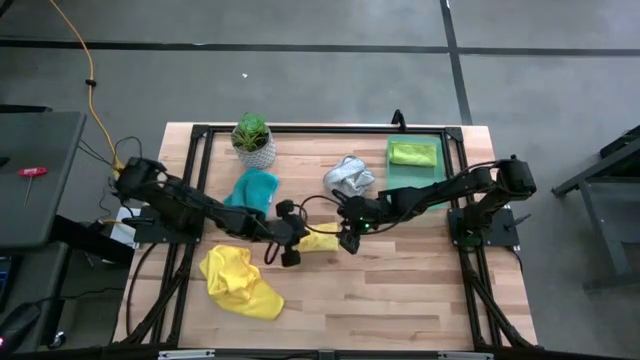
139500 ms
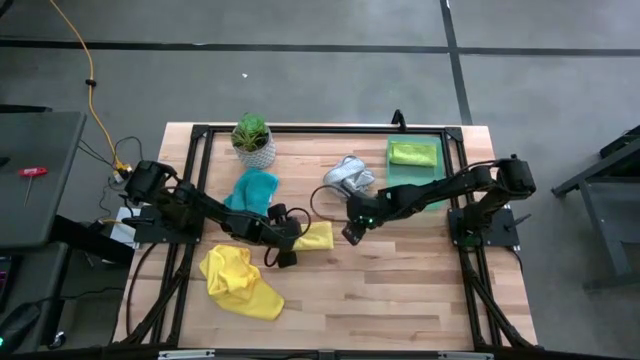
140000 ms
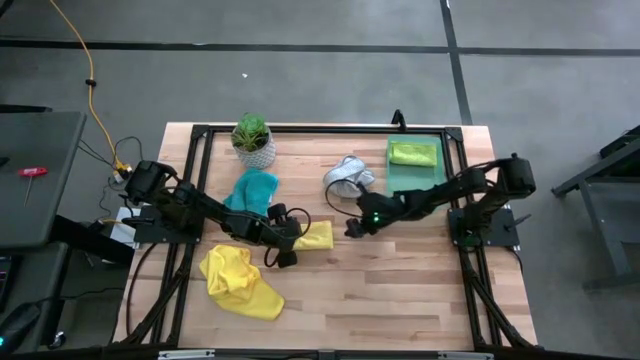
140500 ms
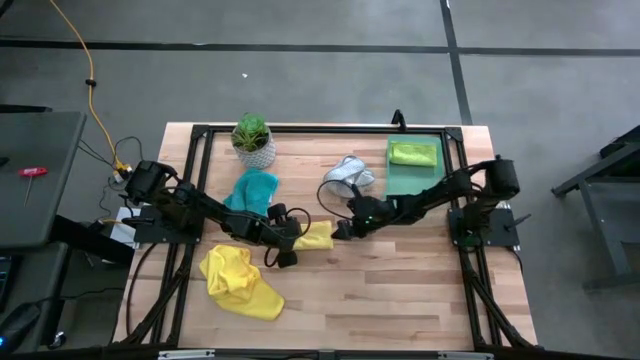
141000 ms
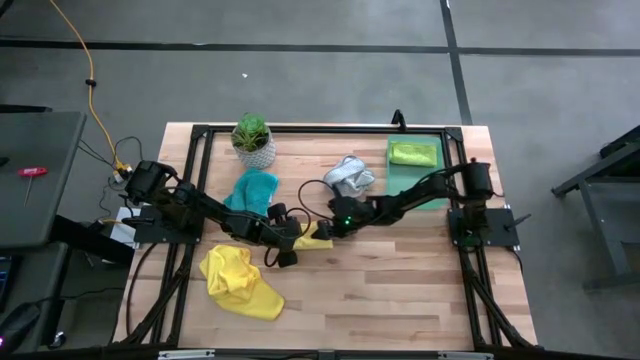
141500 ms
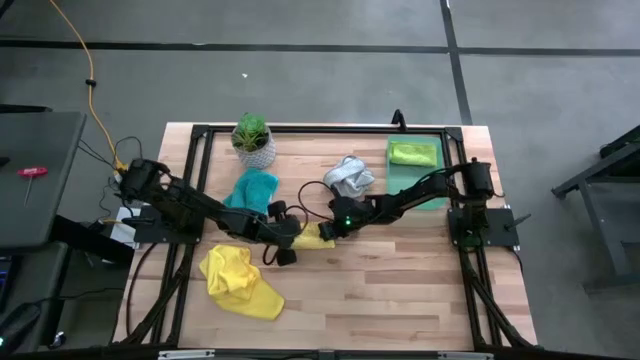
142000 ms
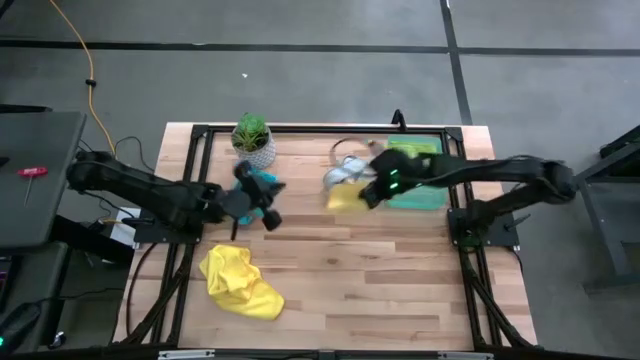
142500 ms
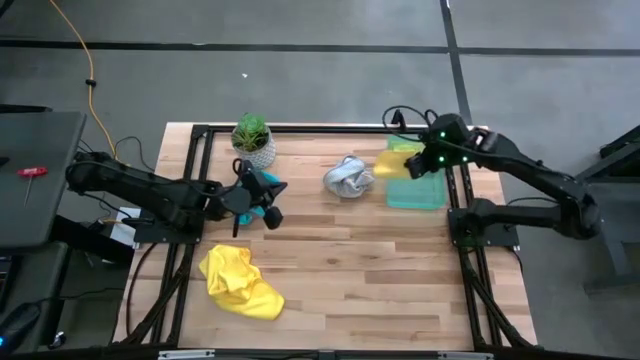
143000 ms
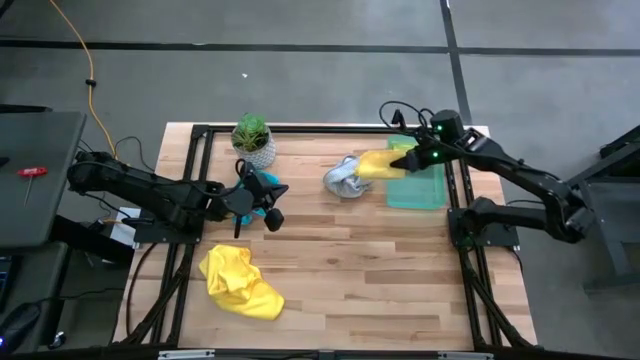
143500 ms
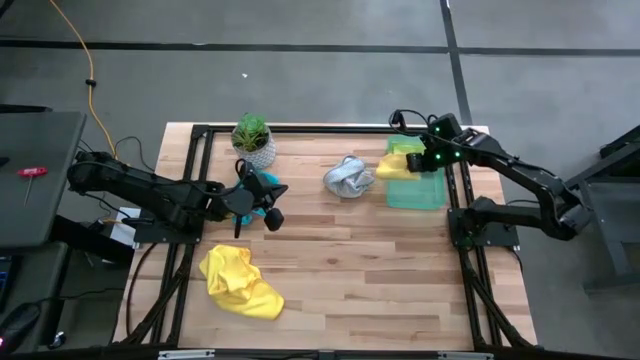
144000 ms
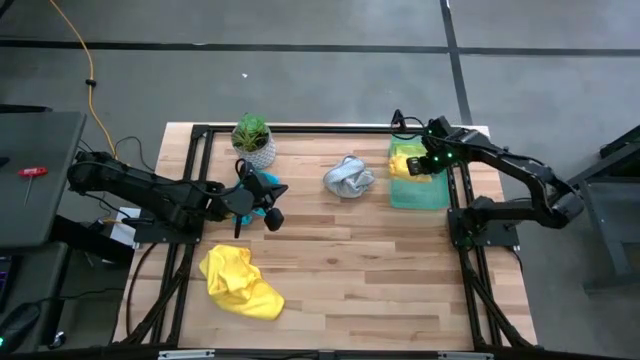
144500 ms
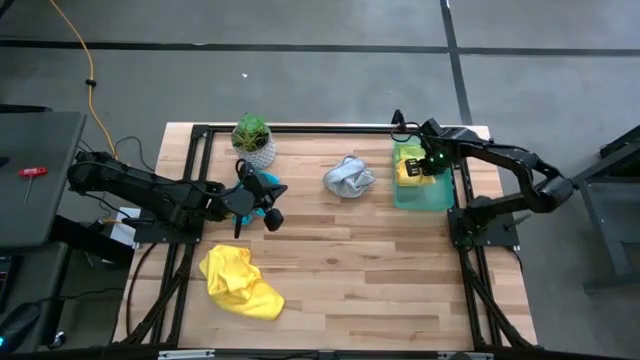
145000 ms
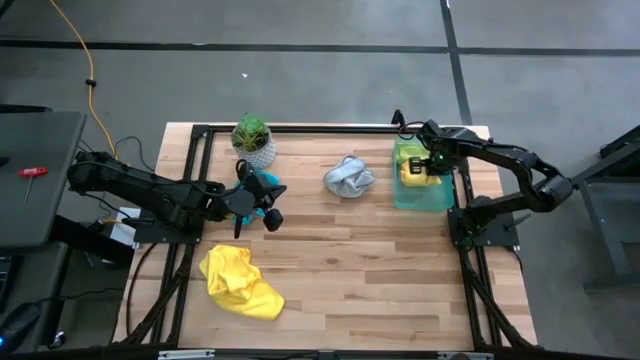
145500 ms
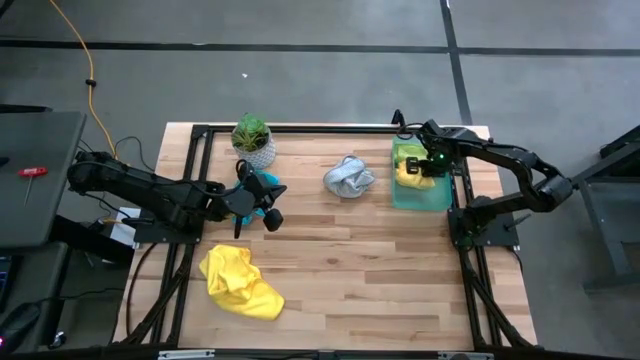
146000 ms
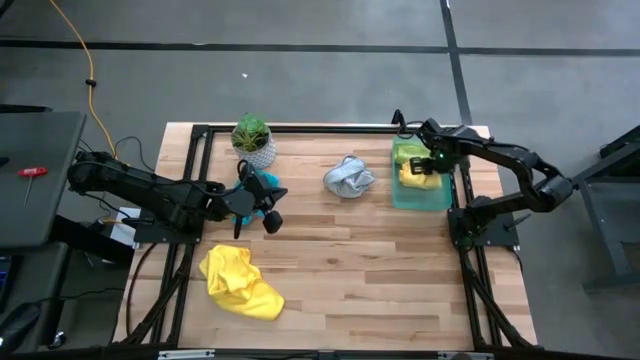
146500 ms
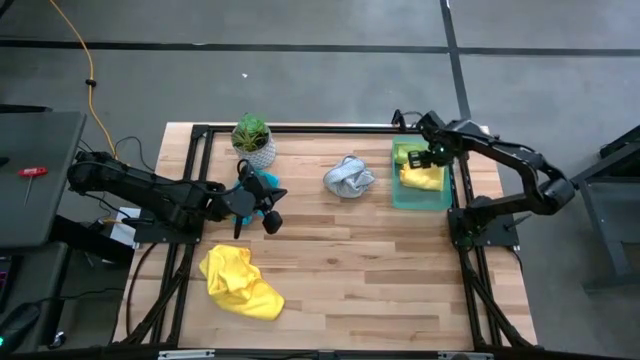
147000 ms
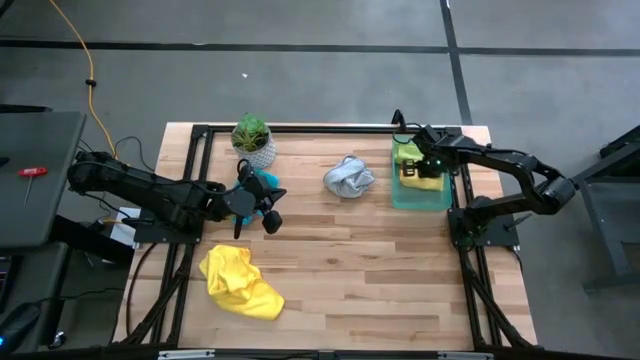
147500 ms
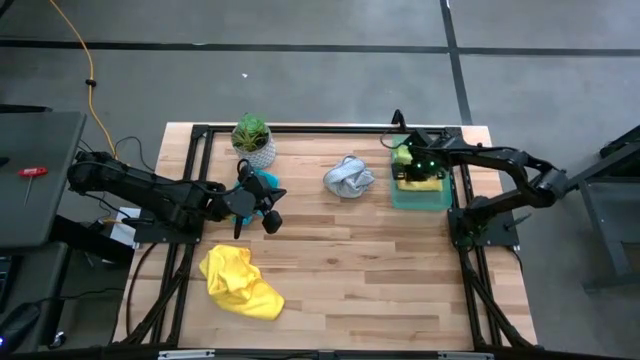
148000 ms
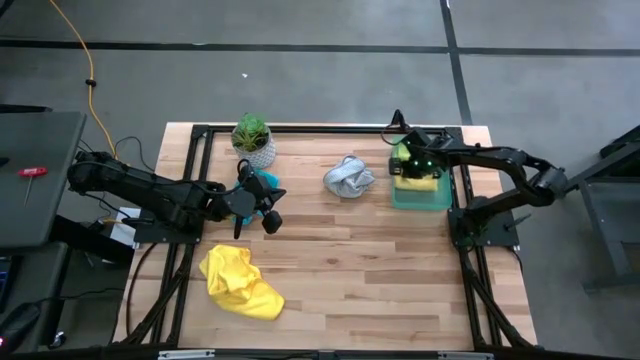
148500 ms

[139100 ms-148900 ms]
Task: Fold microfiber towels
Put the folded yellow microfiber cloth into the green bin

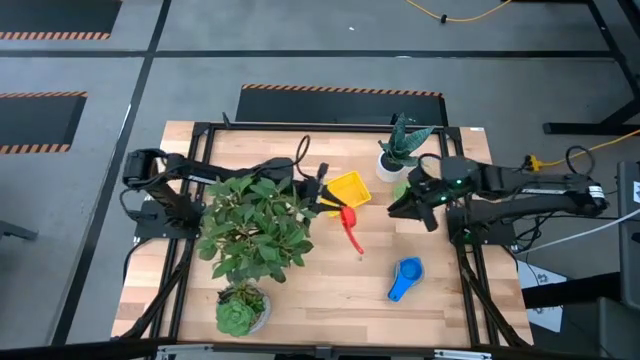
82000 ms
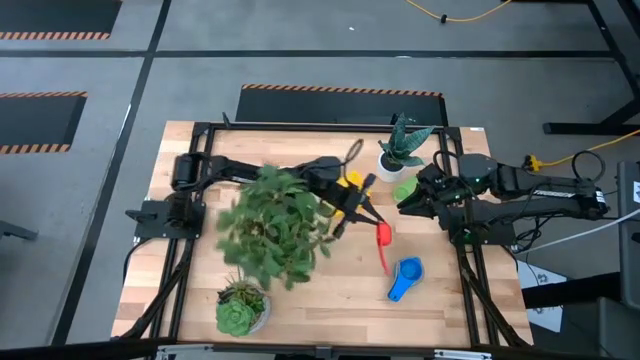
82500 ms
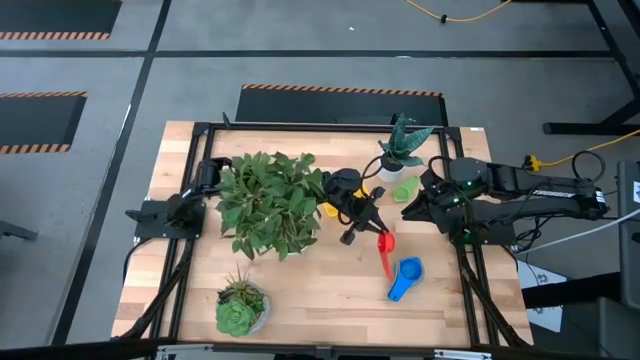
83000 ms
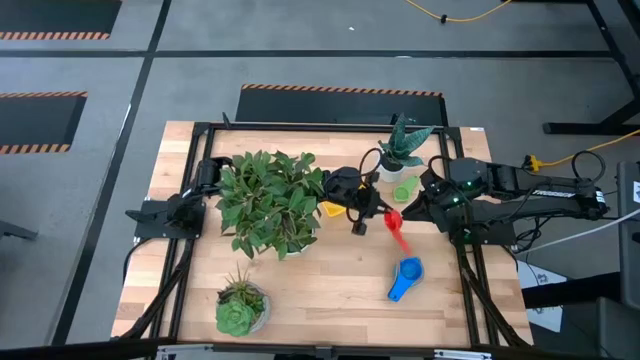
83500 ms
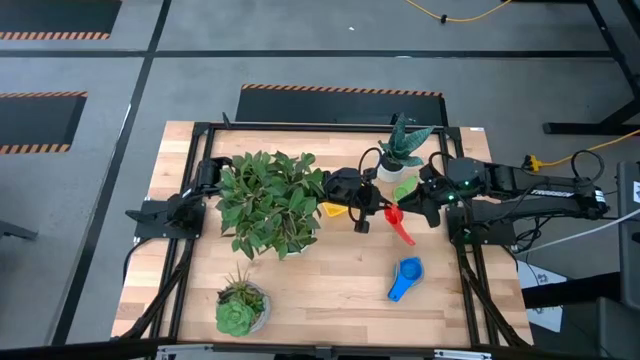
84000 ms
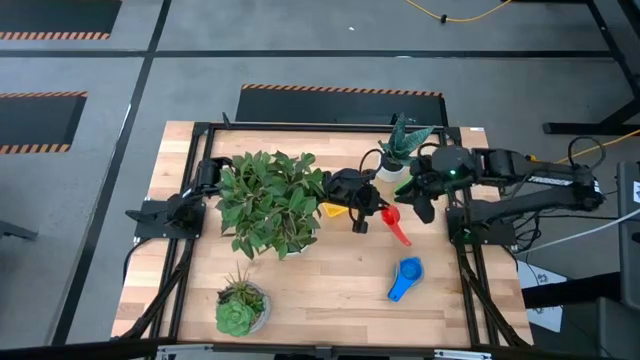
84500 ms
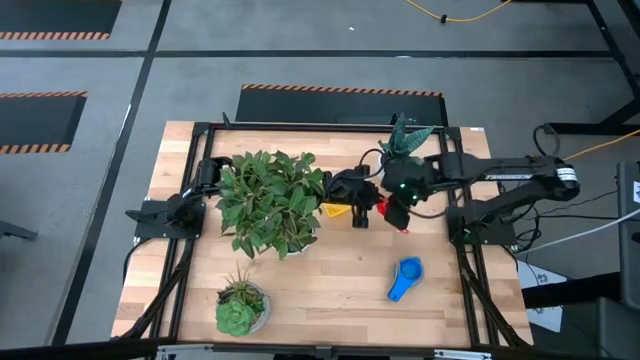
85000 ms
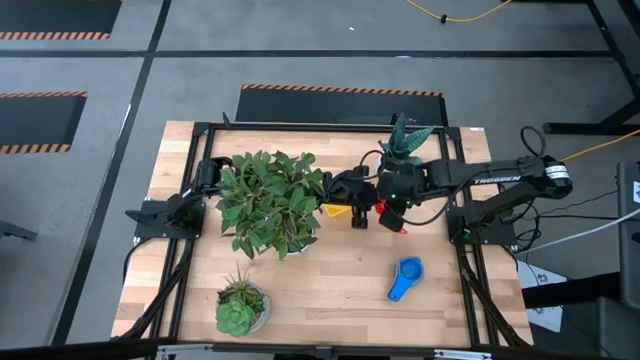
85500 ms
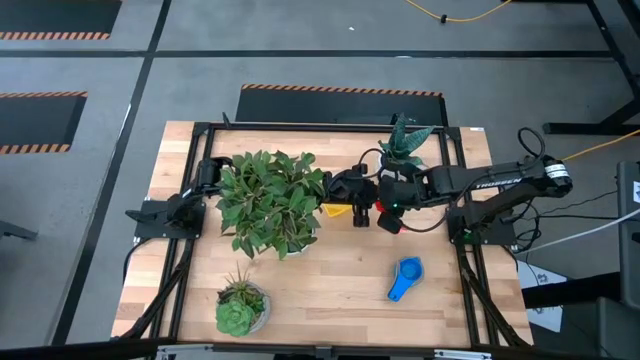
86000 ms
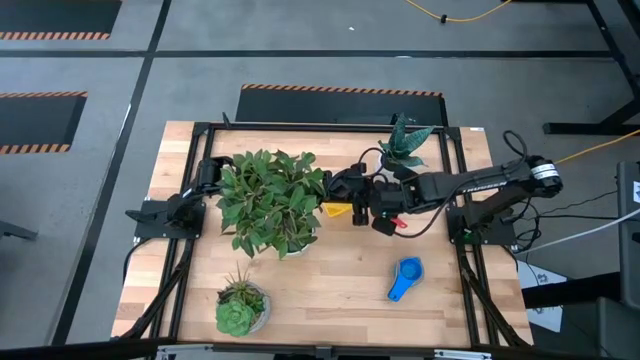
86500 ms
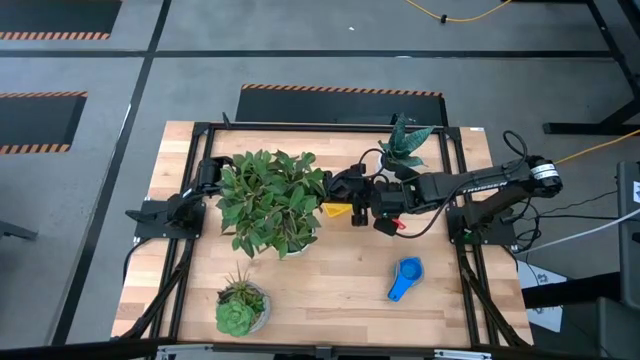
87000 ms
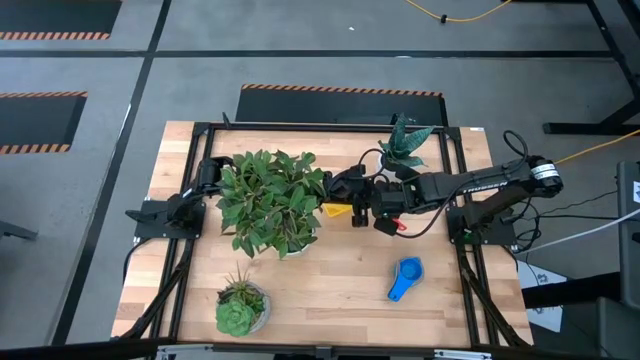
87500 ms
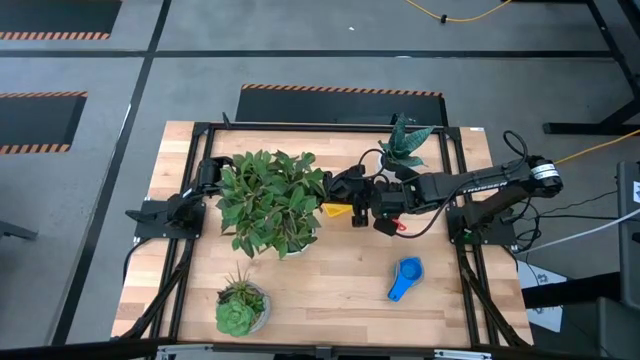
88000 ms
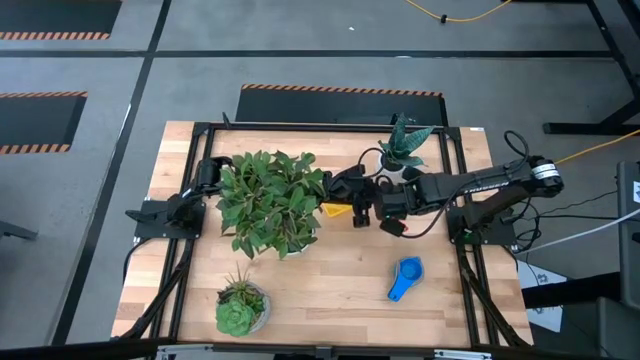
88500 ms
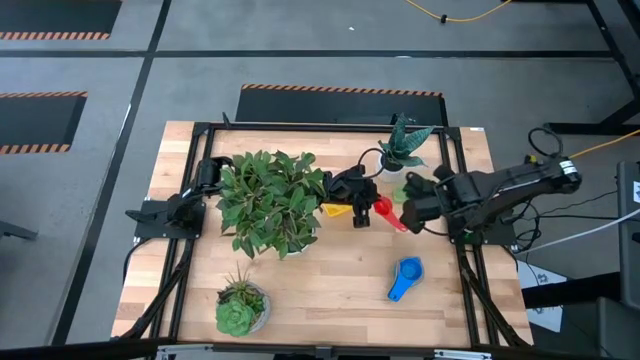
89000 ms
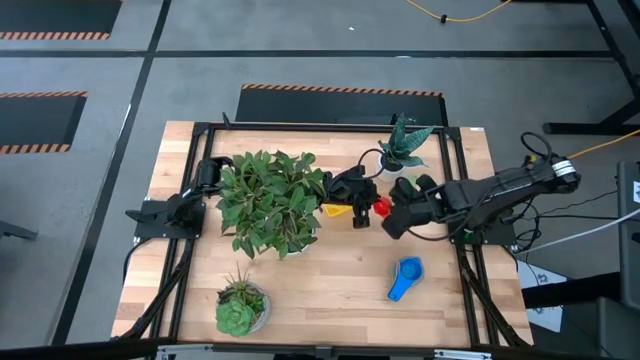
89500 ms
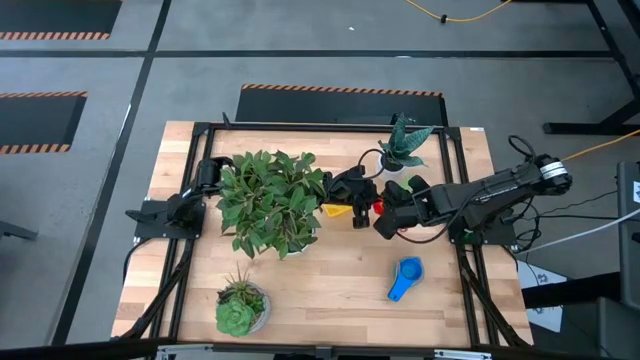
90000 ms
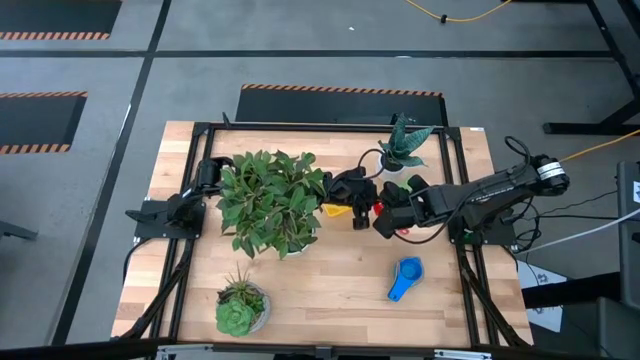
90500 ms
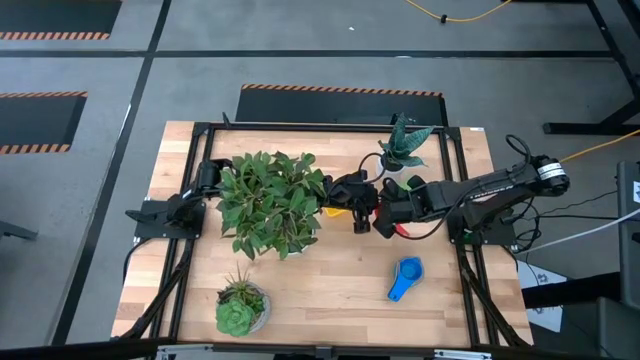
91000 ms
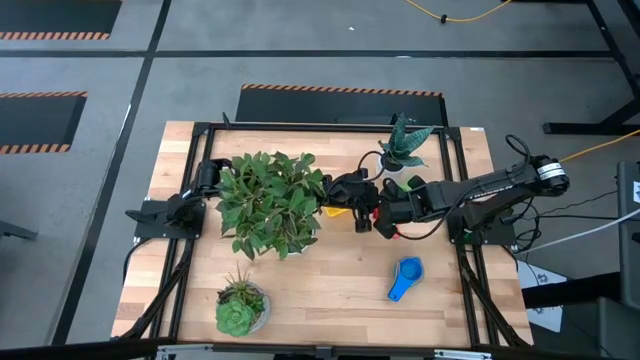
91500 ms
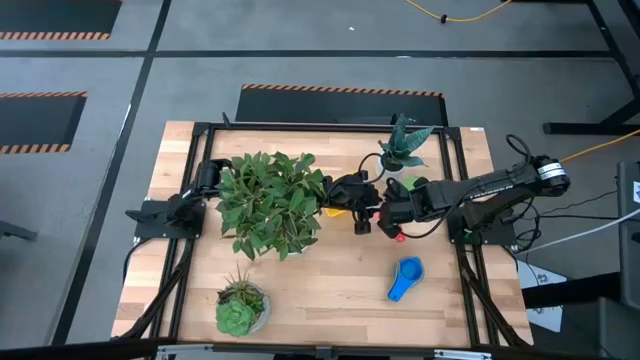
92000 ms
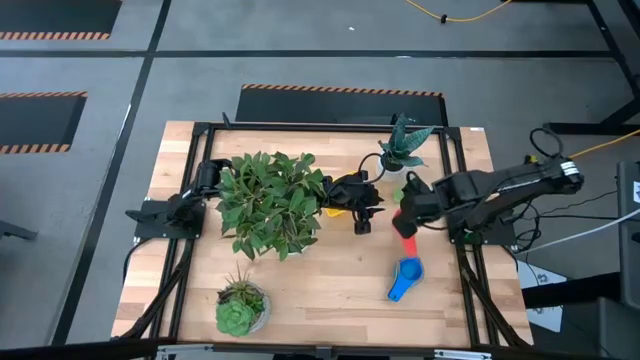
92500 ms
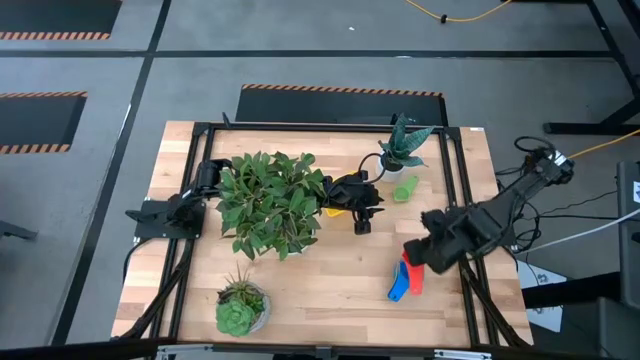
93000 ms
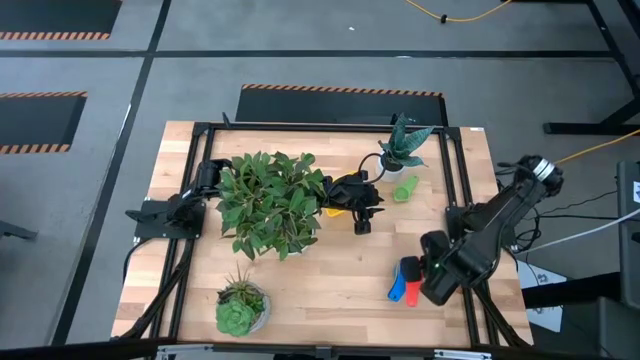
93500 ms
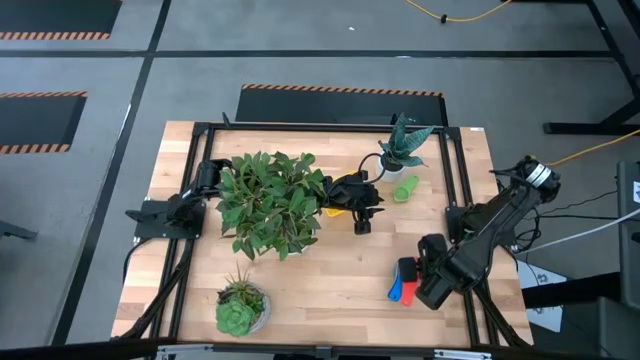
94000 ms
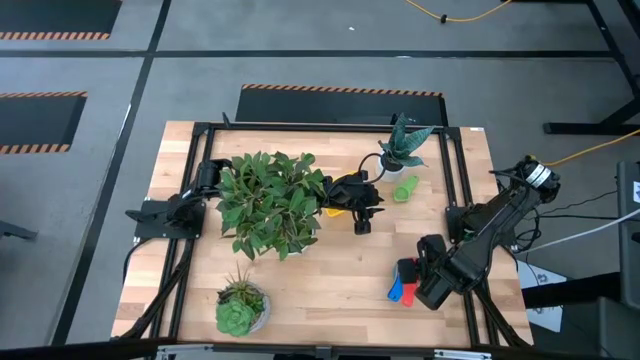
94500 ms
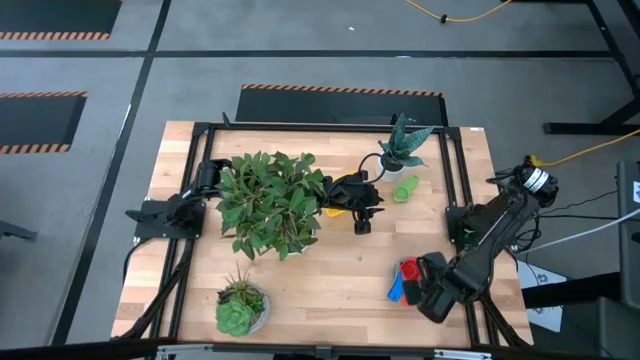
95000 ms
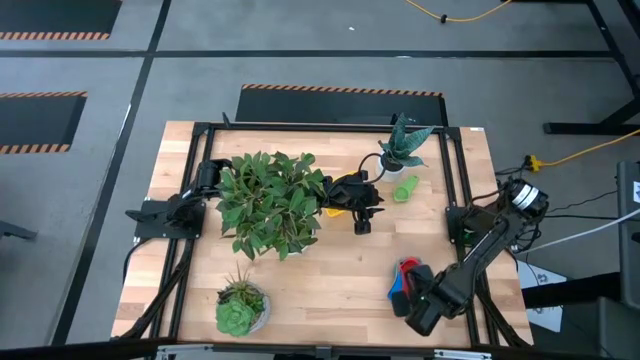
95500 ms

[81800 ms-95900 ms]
Task: Nest measuring cups in basket
Stack the red measuring cup on top of the blue measuring cup
